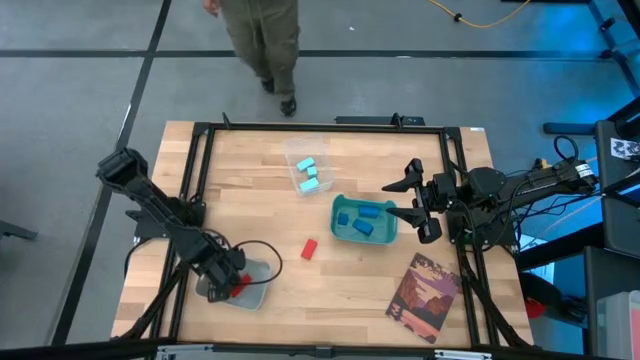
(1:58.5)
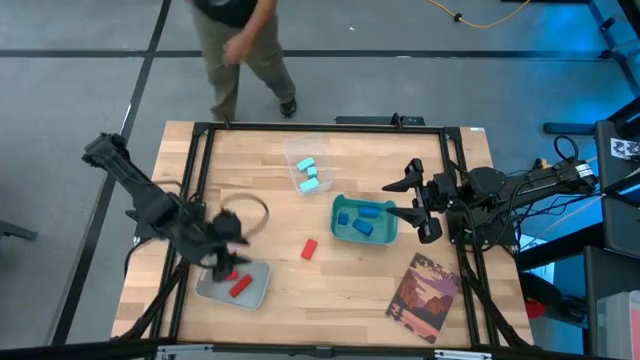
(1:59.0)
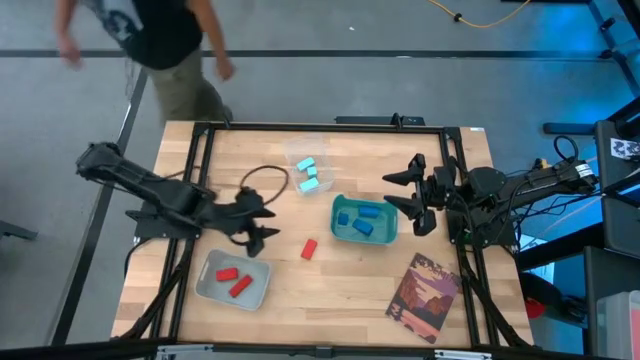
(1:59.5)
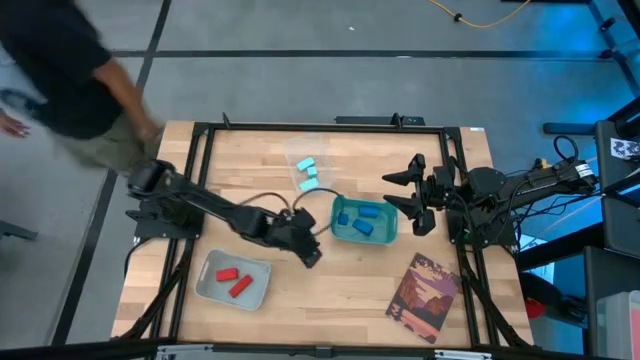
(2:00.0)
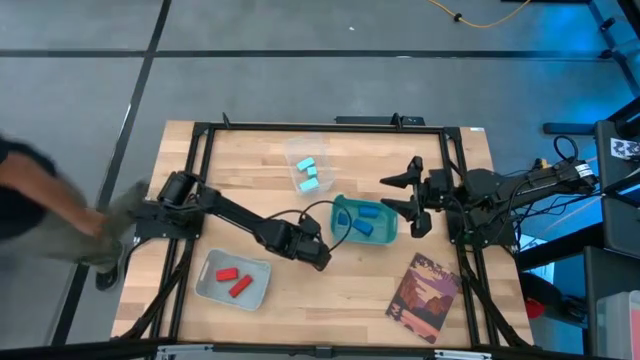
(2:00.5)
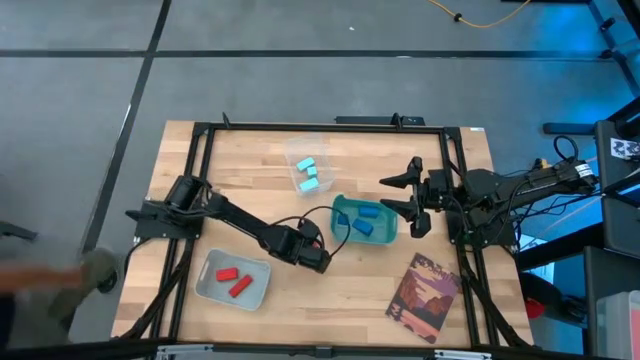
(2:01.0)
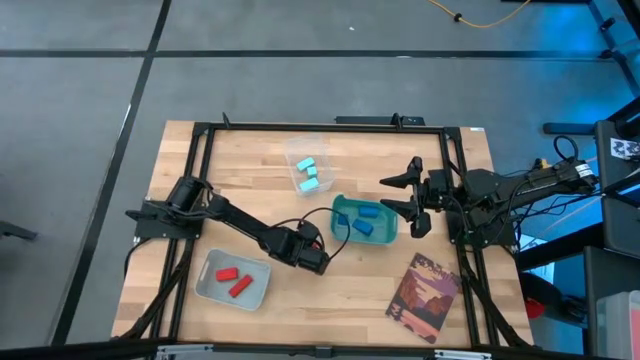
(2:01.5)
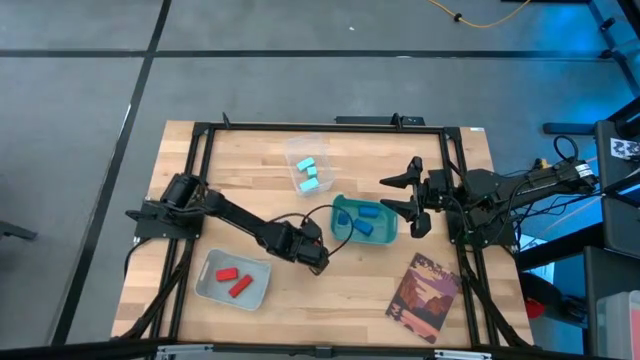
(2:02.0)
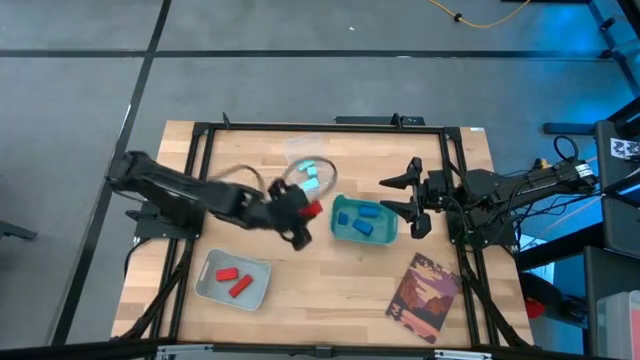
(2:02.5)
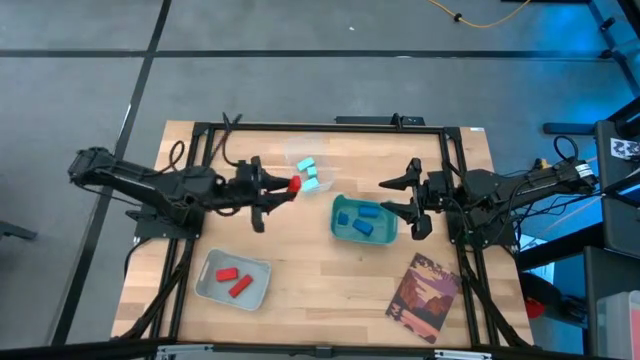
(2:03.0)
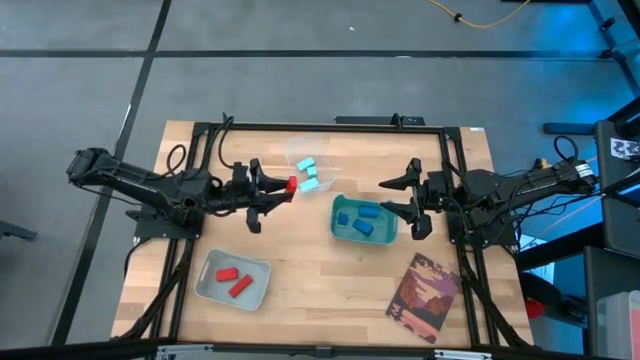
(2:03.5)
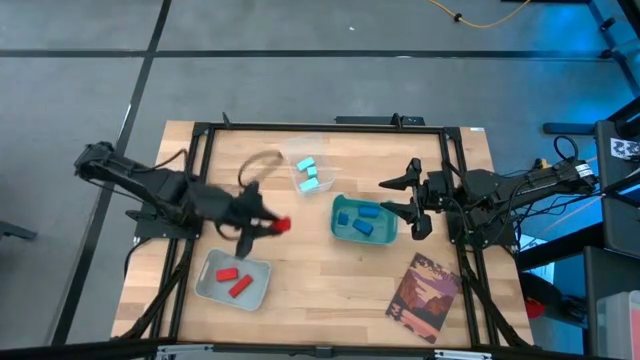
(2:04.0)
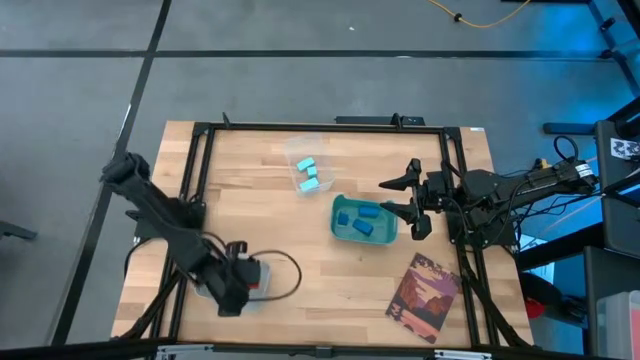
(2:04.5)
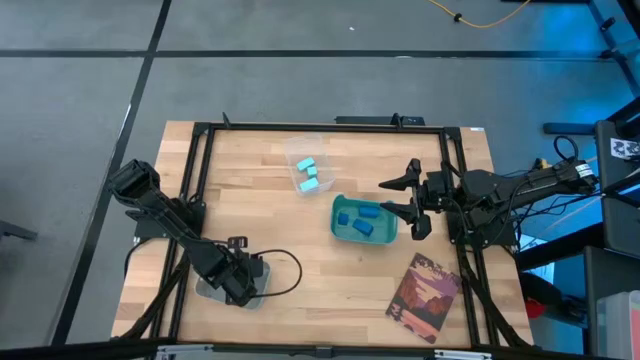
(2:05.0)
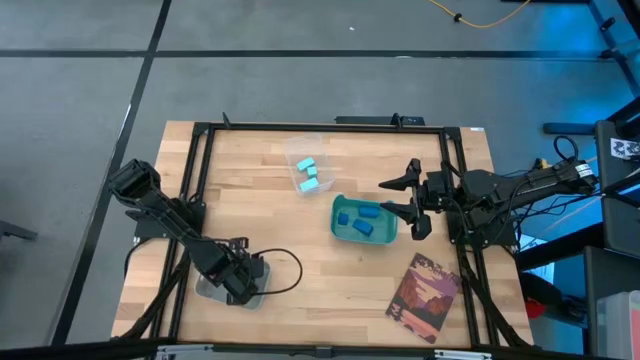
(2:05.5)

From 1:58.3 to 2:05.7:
Task: Sort & place blocks by color
Put the red block into the gray bin

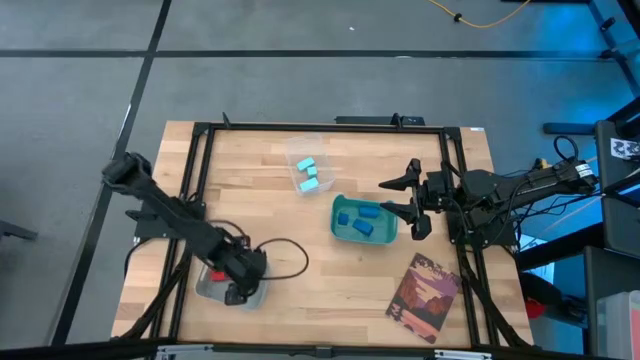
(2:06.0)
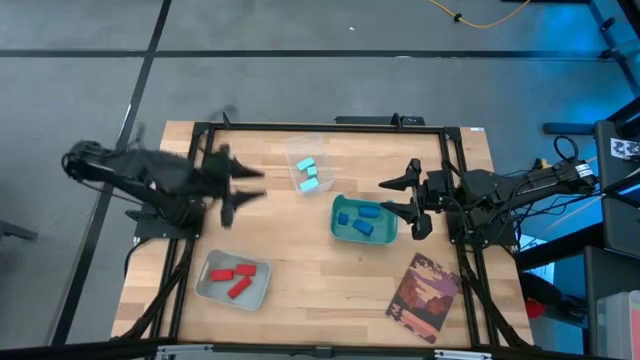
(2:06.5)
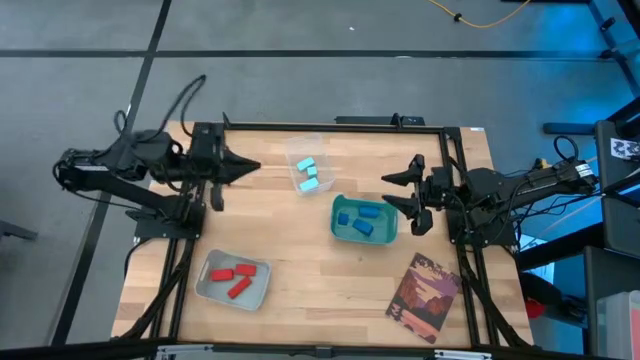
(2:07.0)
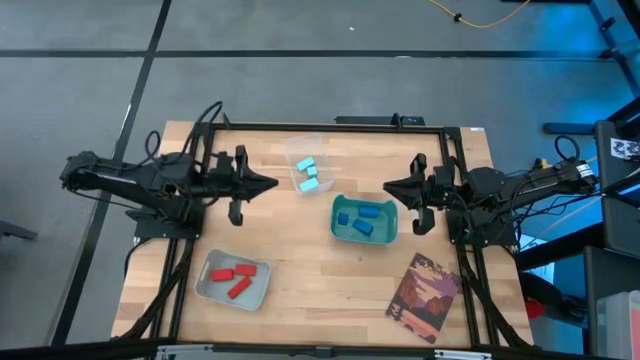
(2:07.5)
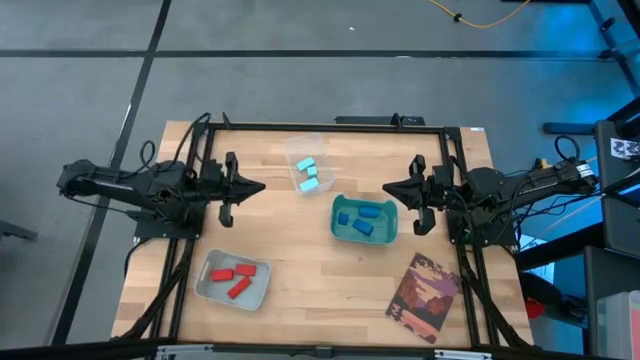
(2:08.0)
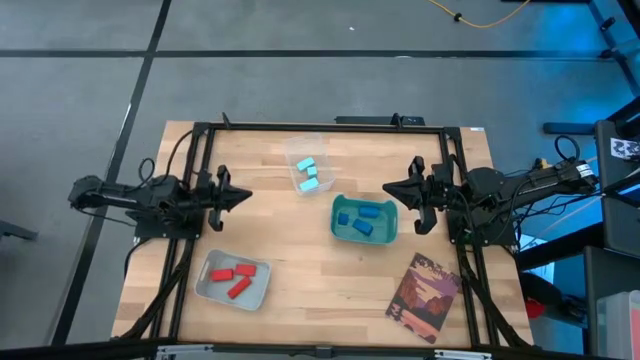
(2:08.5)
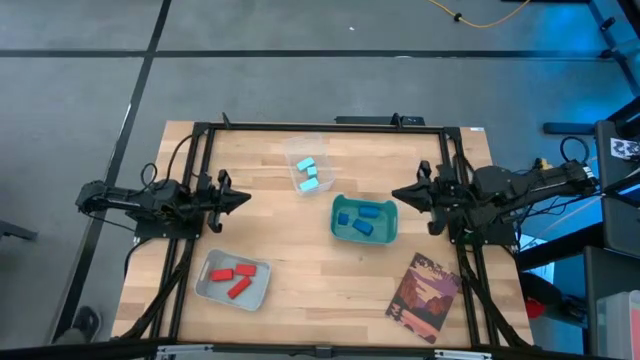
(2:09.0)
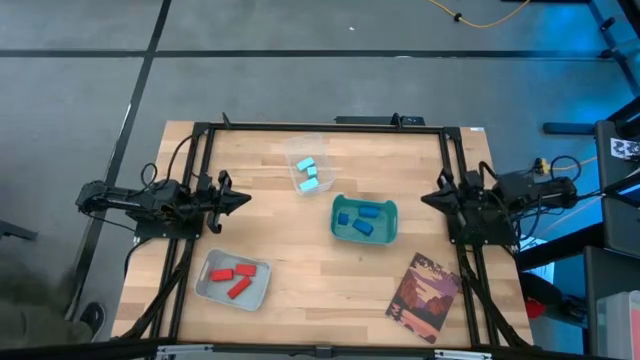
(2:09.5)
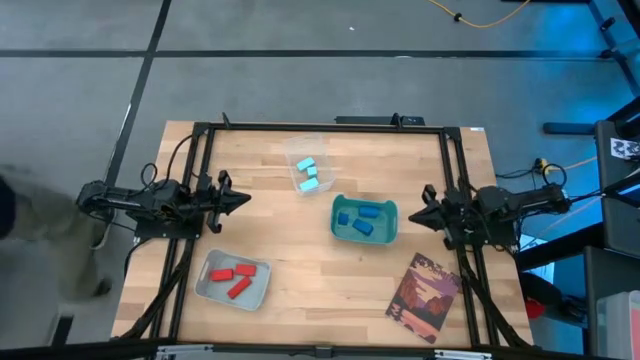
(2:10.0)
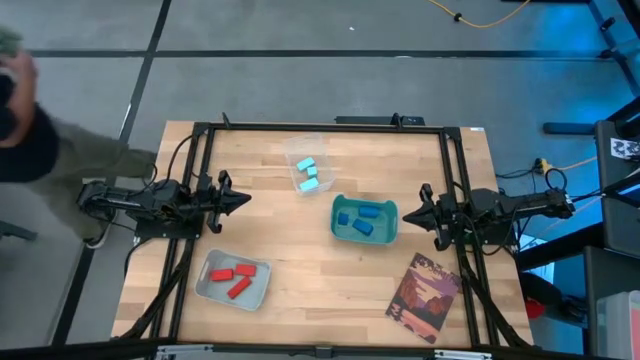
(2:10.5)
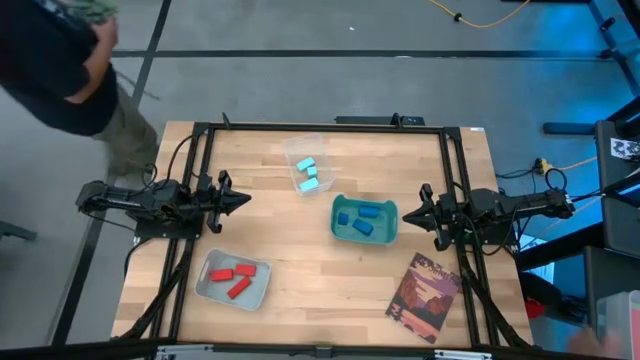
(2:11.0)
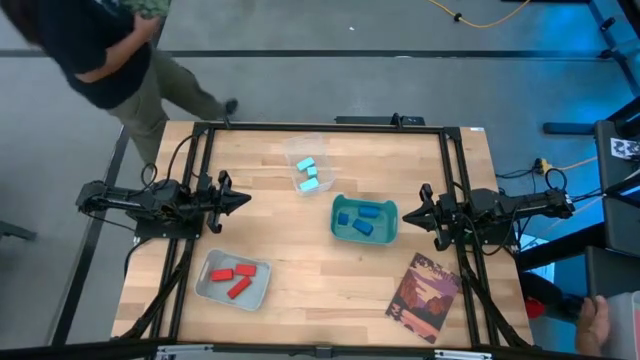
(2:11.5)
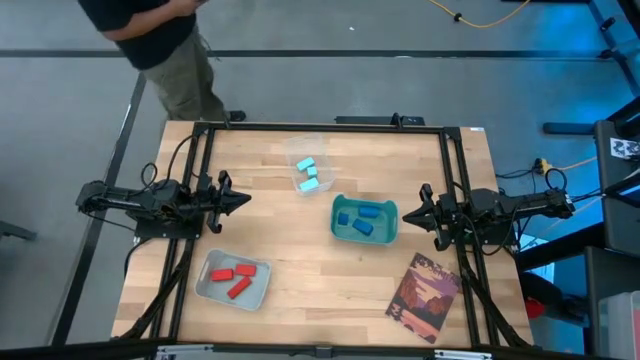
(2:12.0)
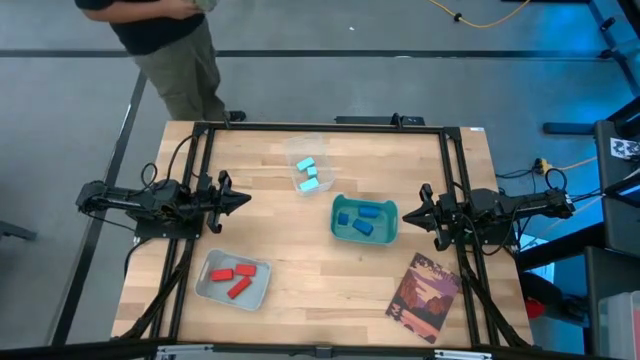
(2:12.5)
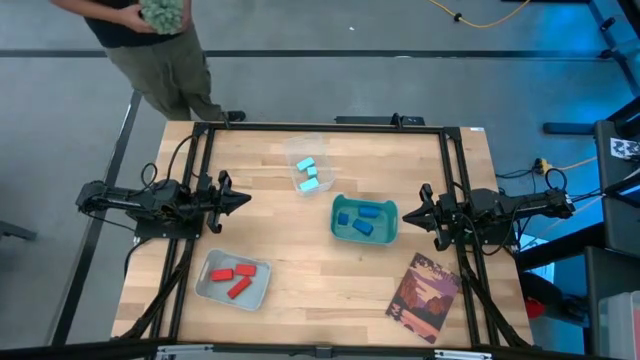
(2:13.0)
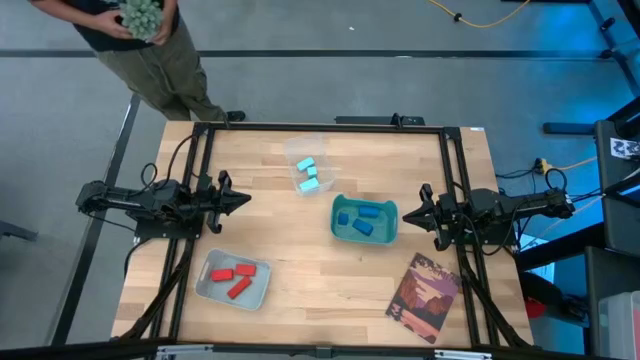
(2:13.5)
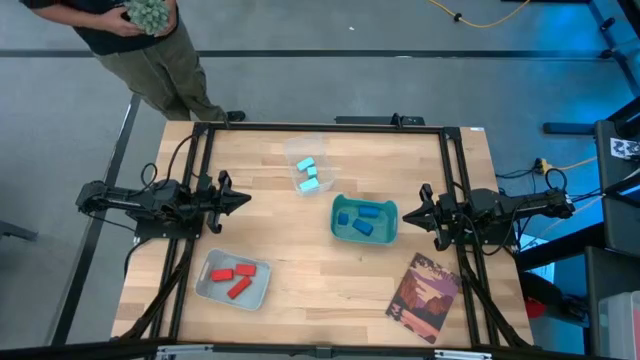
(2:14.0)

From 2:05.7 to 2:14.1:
Return to Home Position

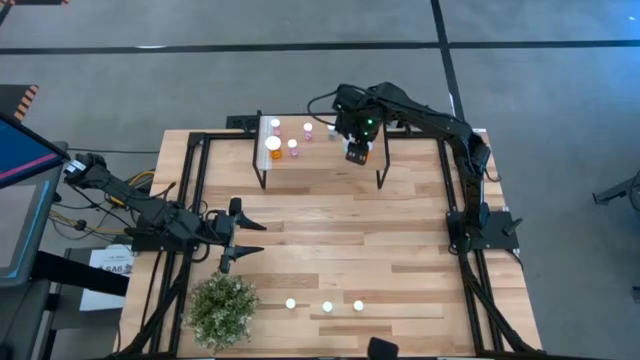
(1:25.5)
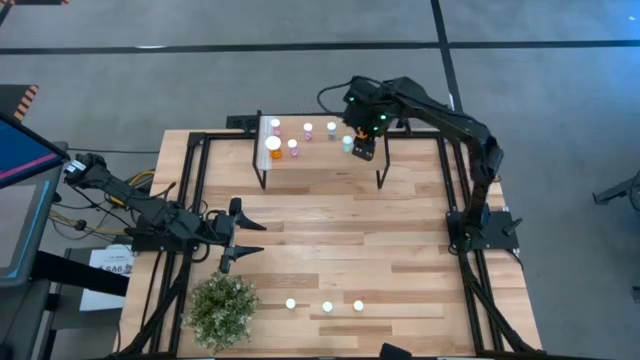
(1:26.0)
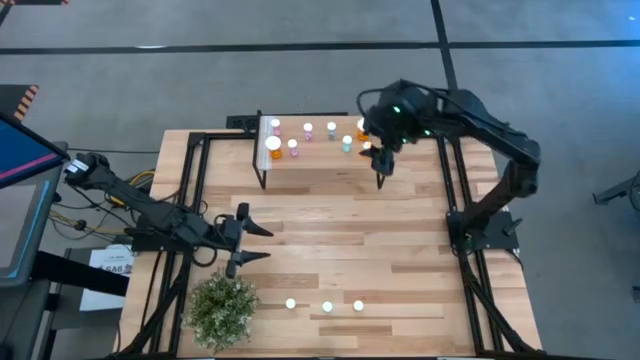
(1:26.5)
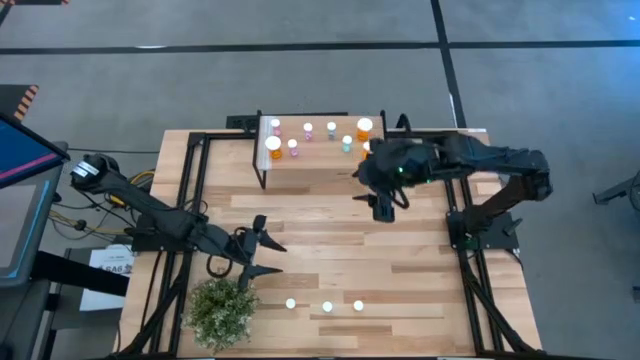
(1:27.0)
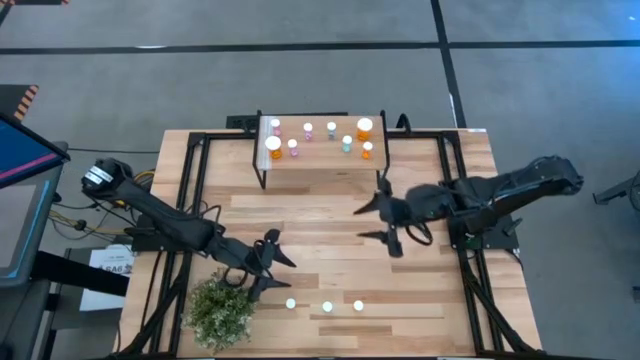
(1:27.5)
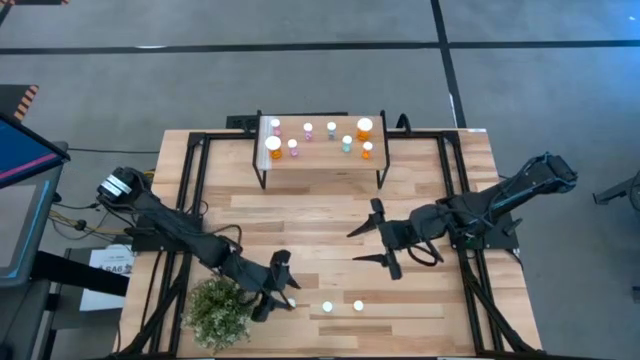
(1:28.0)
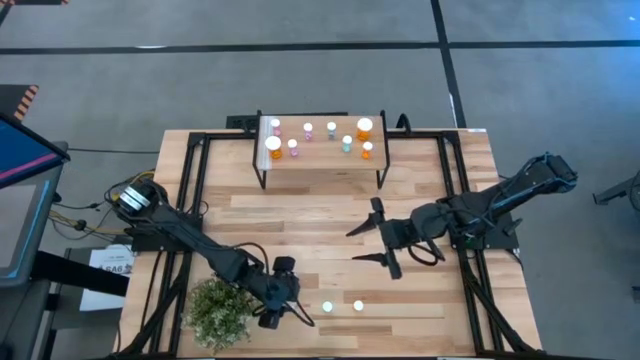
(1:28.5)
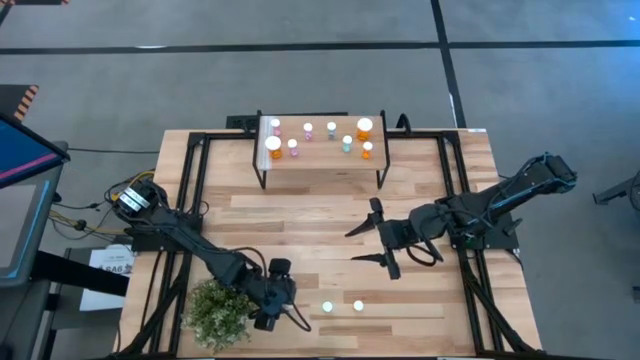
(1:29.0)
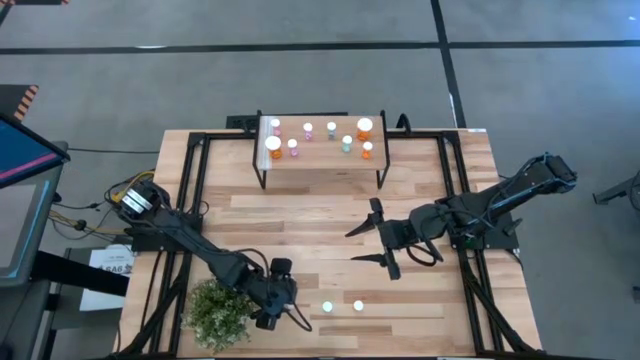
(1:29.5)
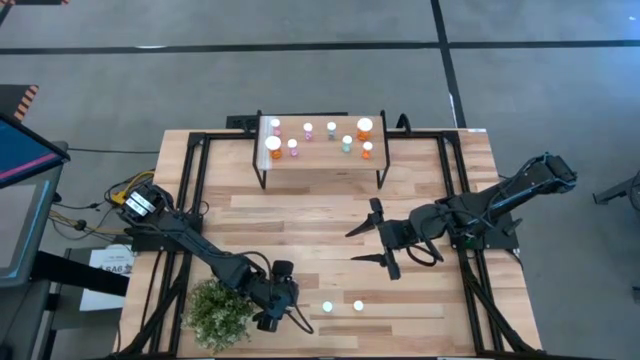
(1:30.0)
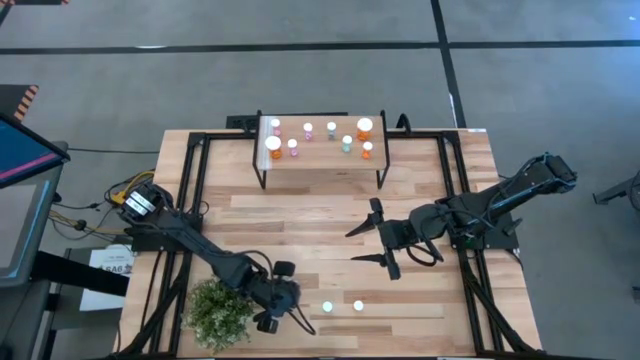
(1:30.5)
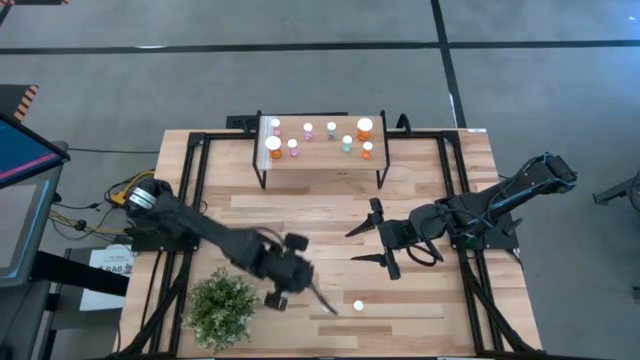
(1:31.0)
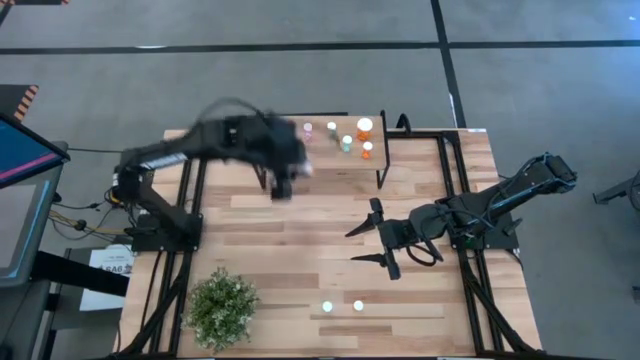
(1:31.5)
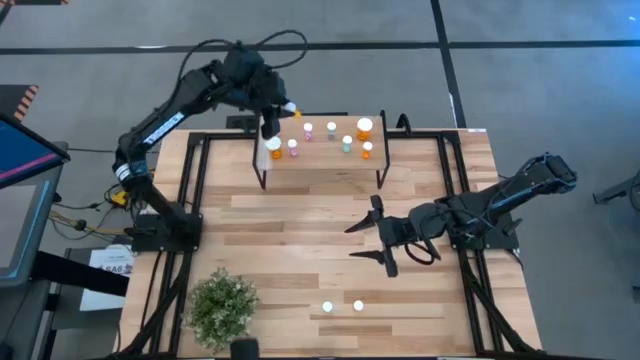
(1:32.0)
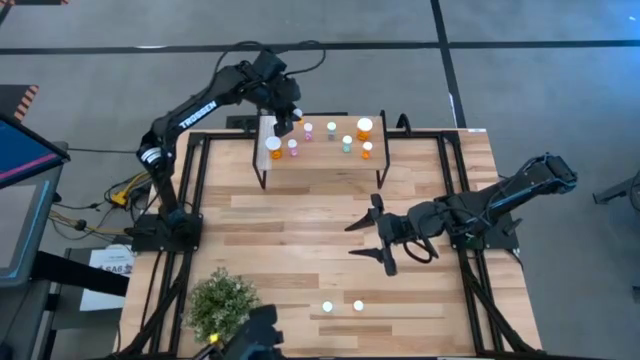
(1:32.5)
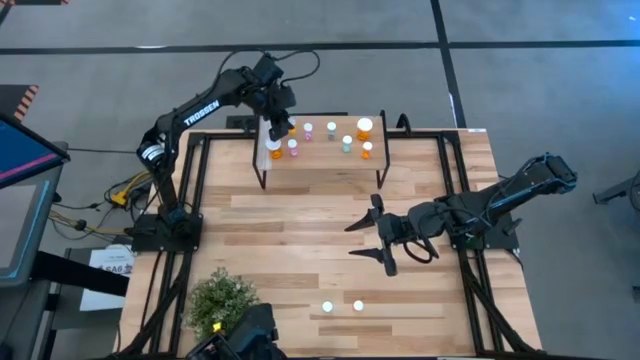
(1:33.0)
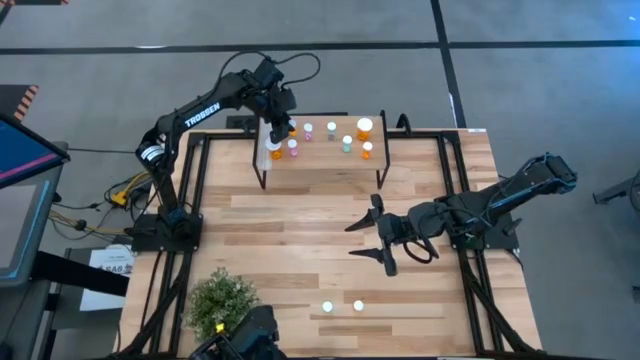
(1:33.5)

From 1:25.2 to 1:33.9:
Task: Pick and place medicine bottles onto shelf by color
Put the small orange pill bottle on the shelf
